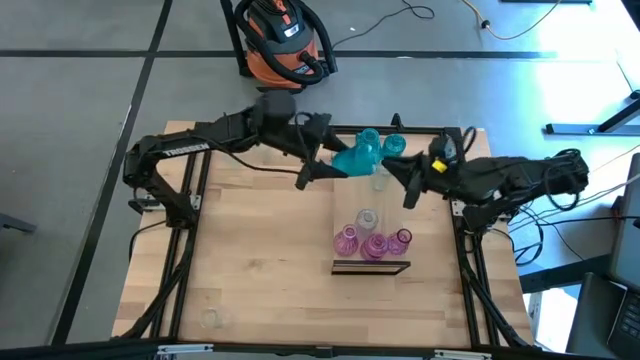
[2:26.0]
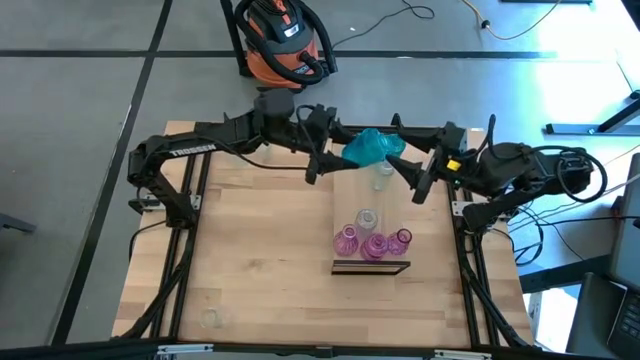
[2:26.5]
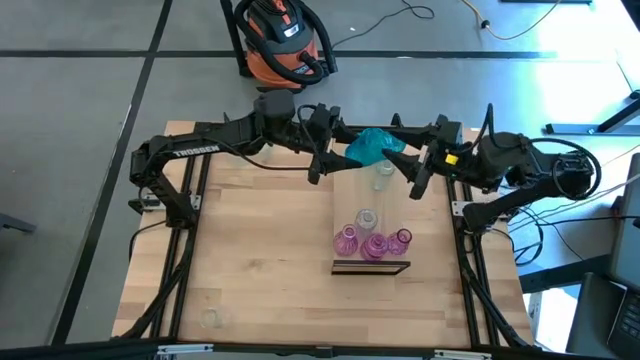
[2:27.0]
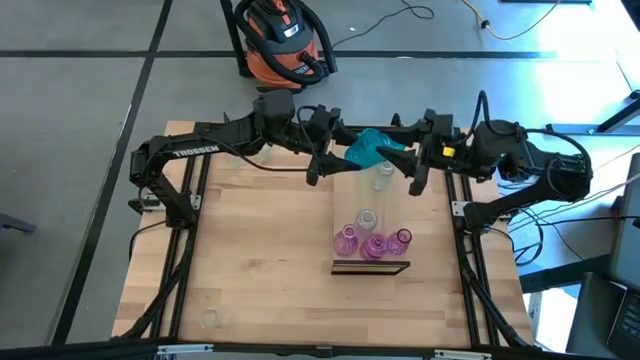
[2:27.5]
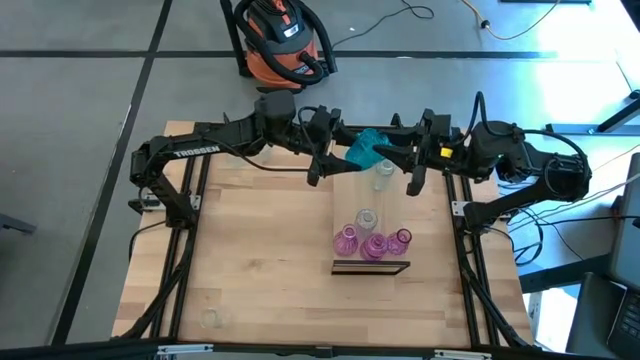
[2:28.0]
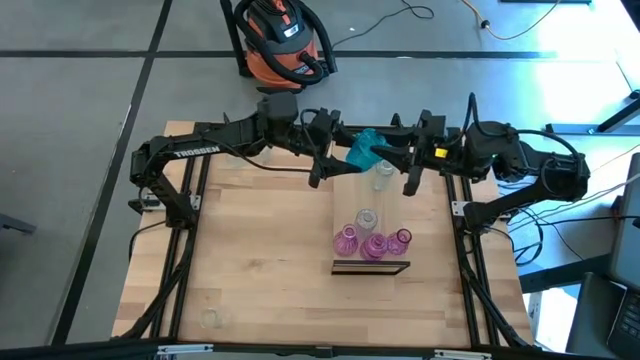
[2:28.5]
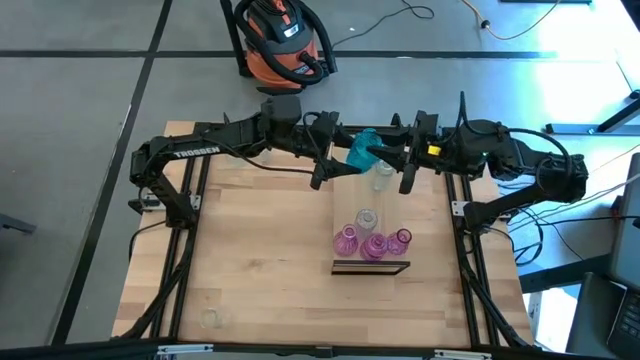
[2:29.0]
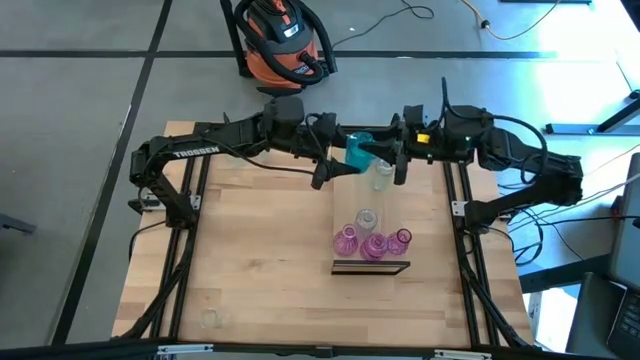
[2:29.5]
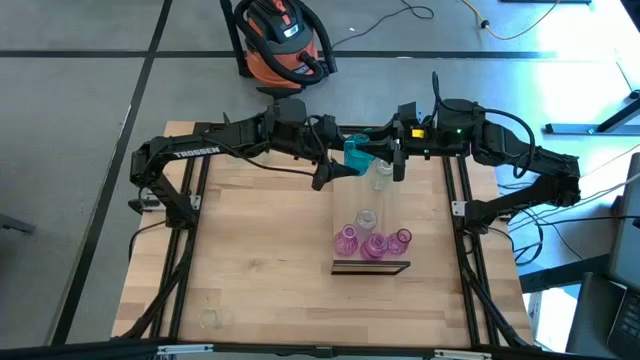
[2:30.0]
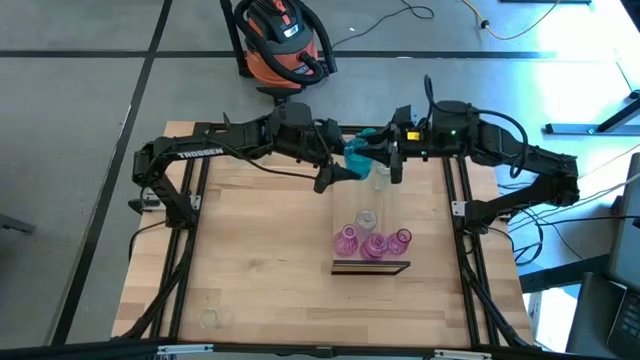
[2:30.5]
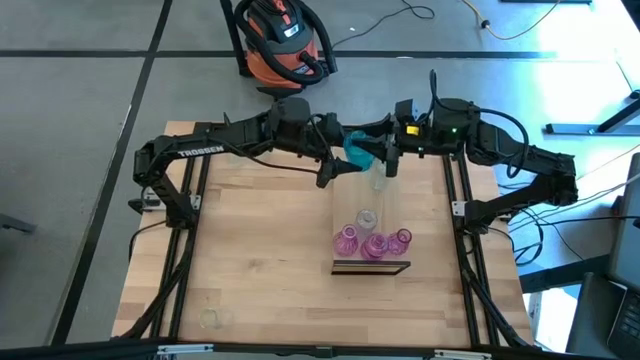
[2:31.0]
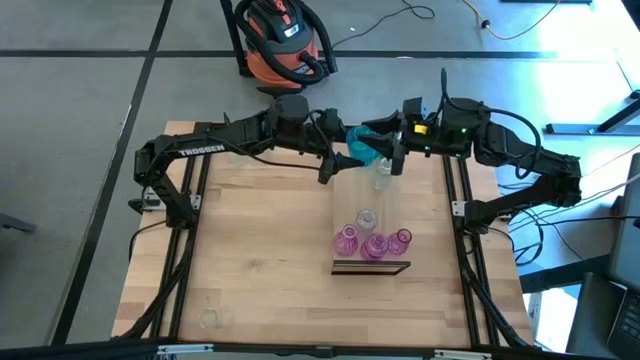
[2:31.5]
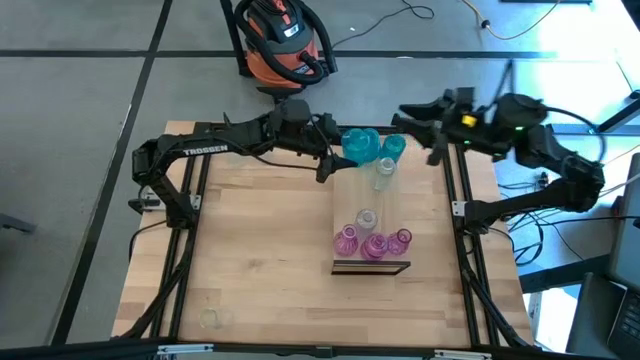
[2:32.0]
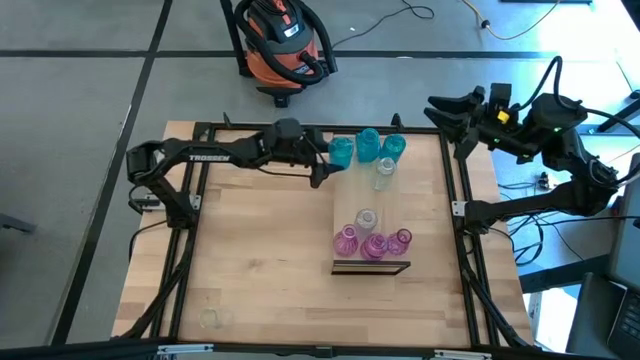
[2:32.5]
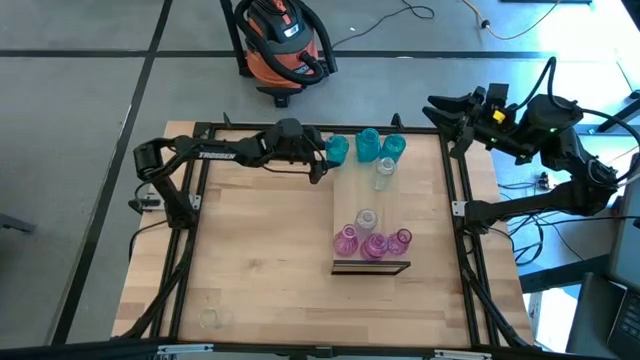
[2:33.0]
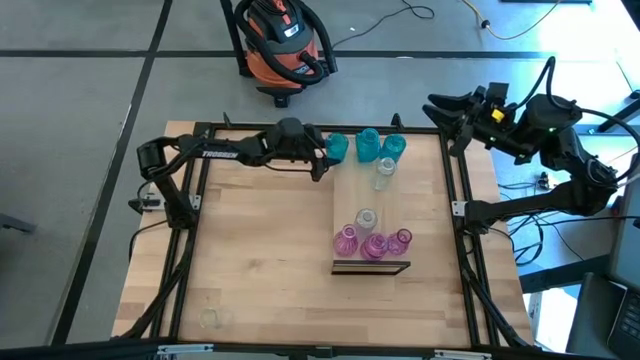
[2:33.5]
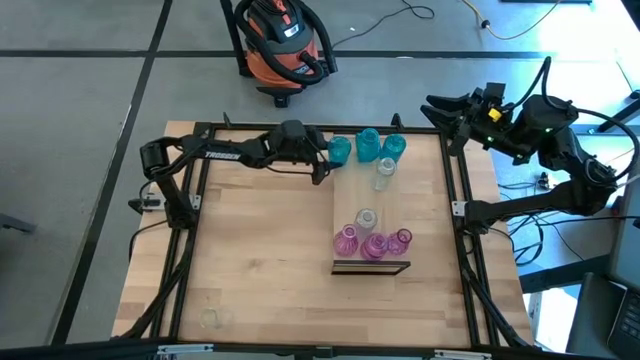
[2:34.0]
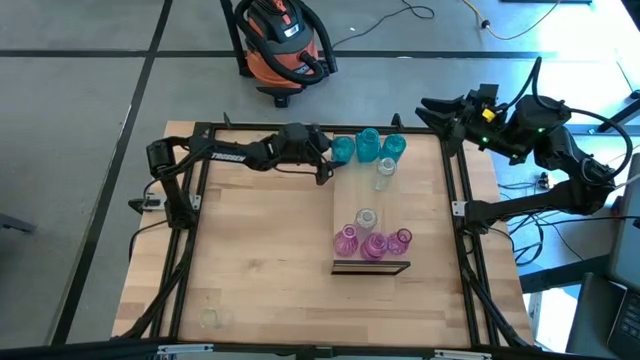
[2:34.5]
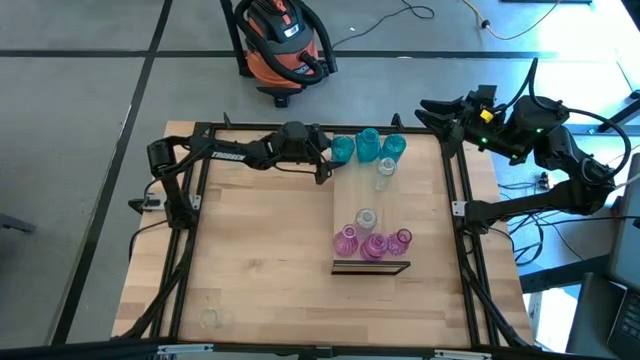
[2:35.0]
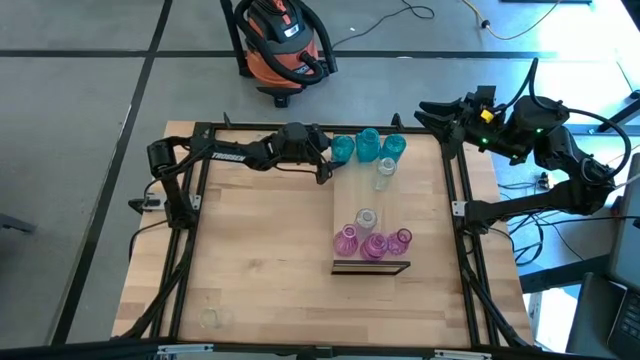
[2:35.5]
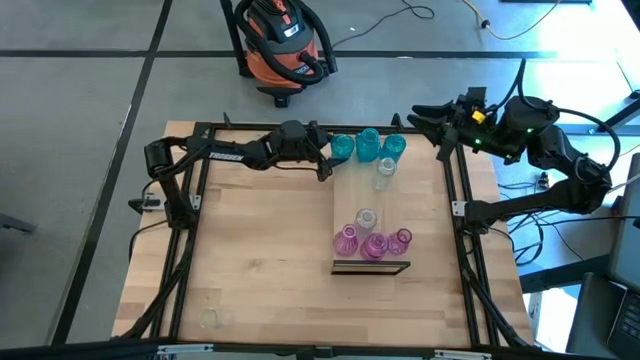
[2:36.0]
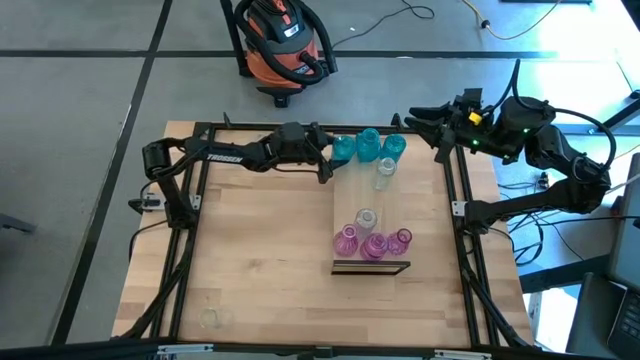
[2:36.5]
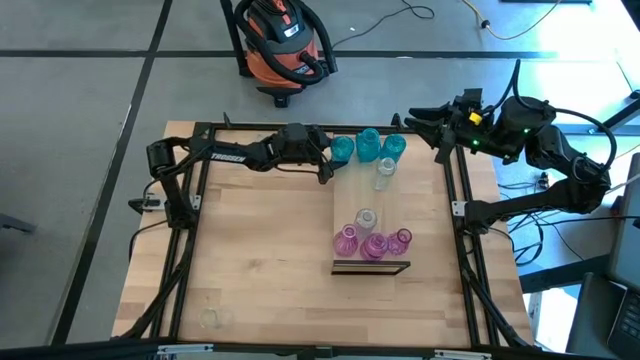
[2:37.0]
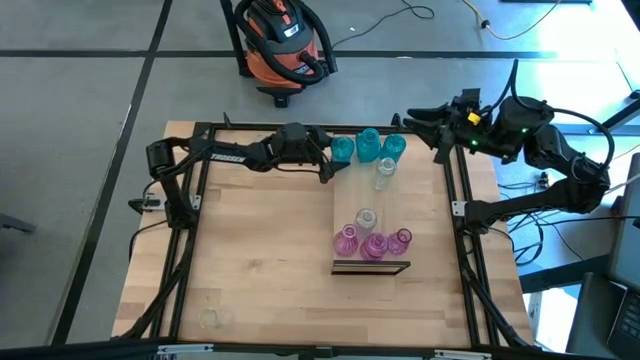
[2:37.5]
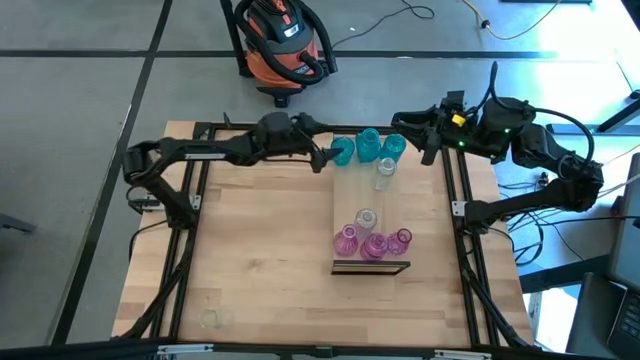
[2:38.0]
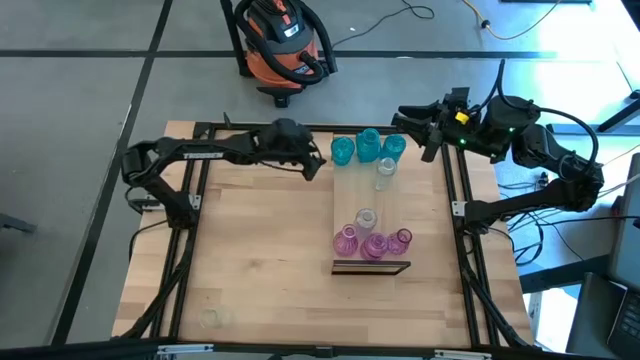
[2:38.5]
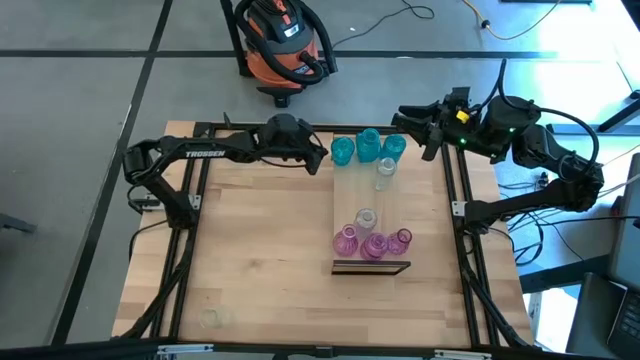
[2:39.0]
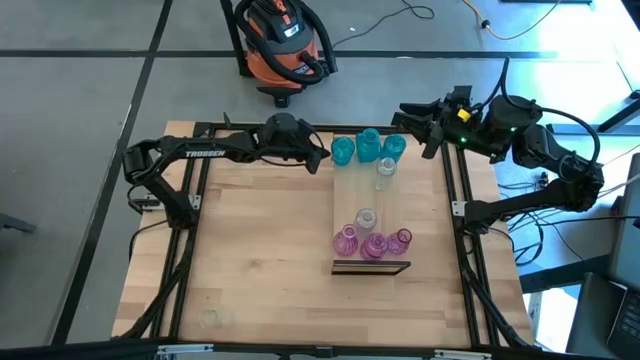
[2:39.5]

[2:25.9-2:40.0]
Task: sort vases onto shelf
Adjust the blue vase on the shelf

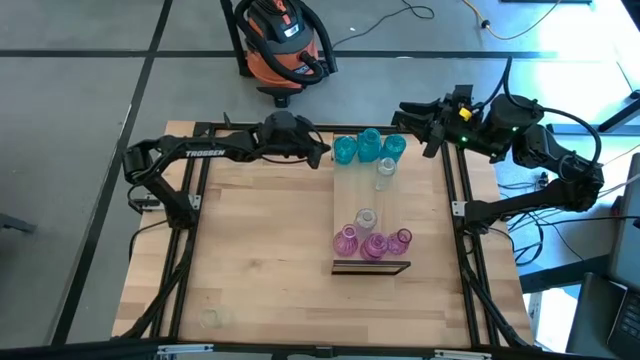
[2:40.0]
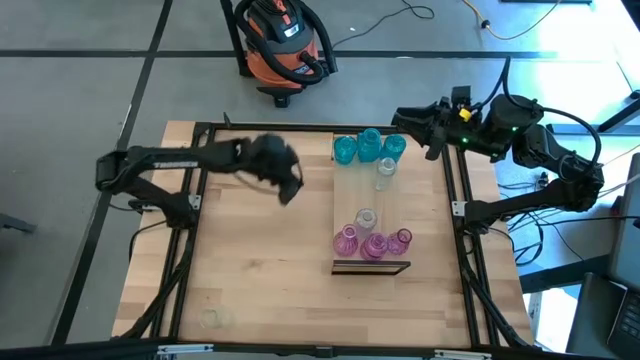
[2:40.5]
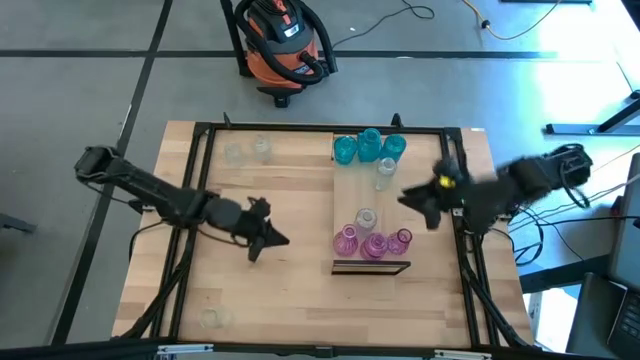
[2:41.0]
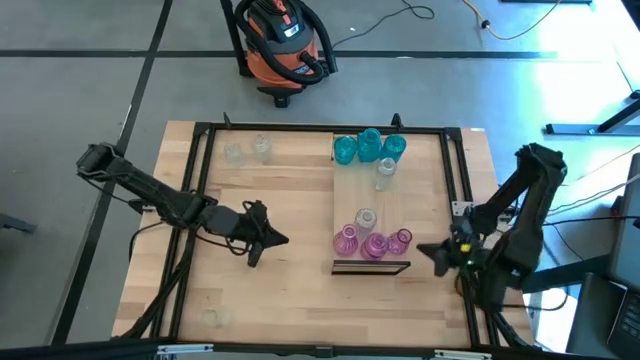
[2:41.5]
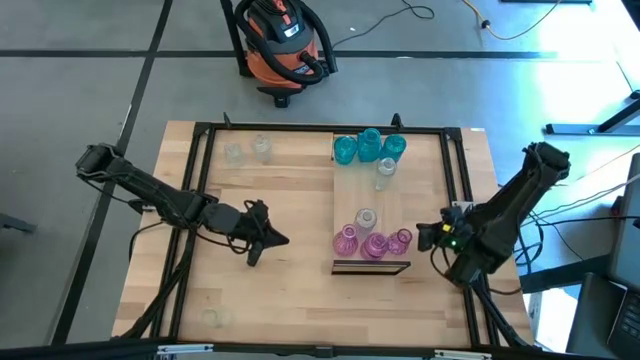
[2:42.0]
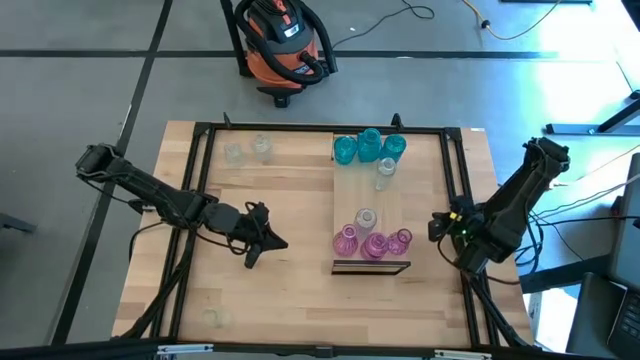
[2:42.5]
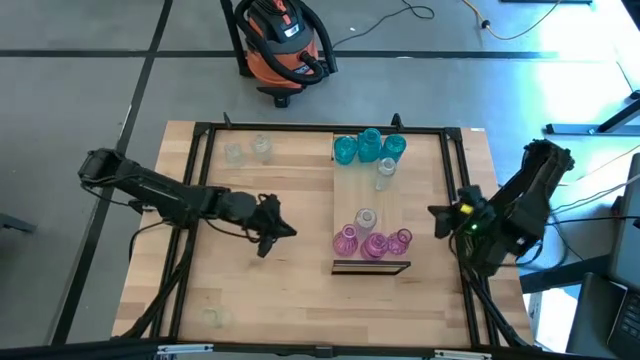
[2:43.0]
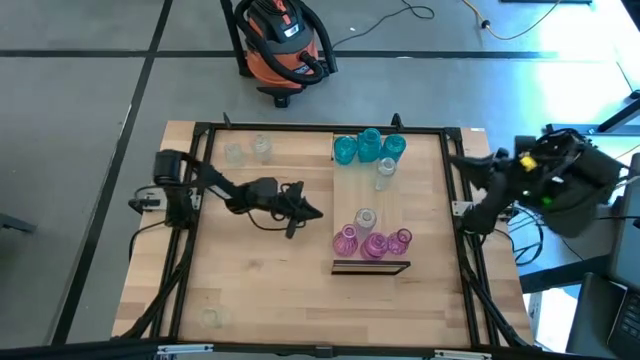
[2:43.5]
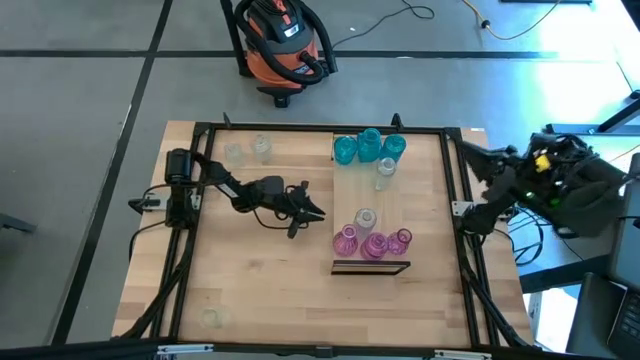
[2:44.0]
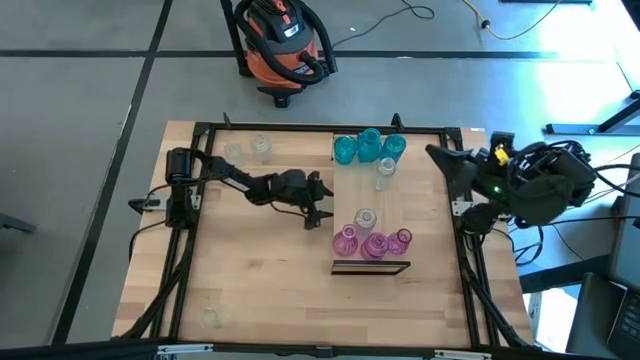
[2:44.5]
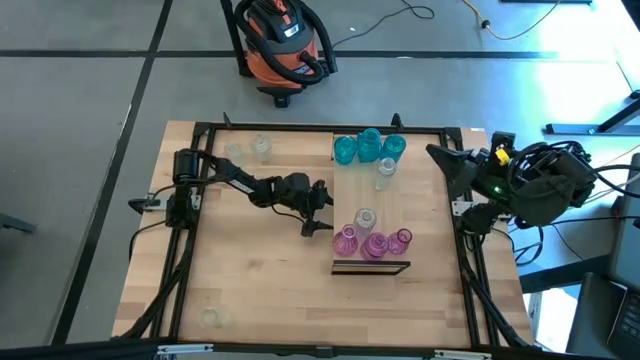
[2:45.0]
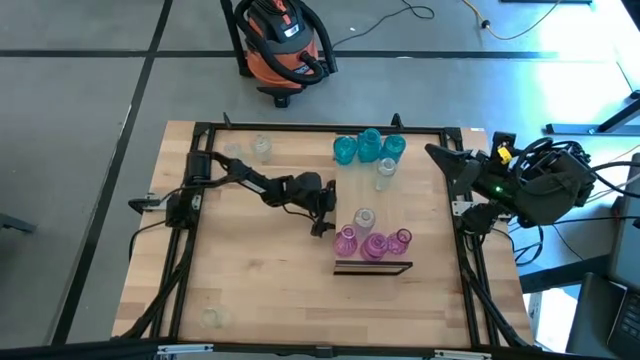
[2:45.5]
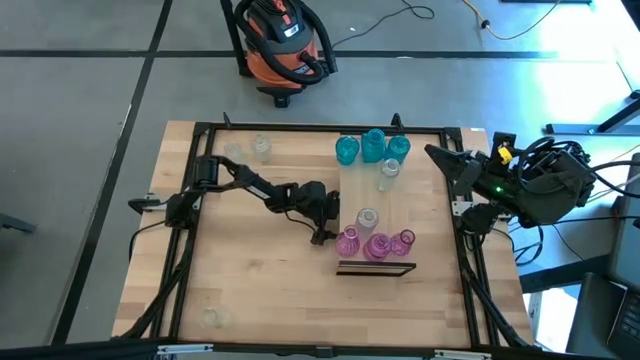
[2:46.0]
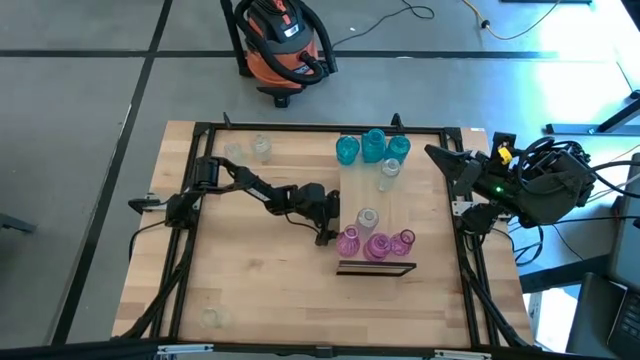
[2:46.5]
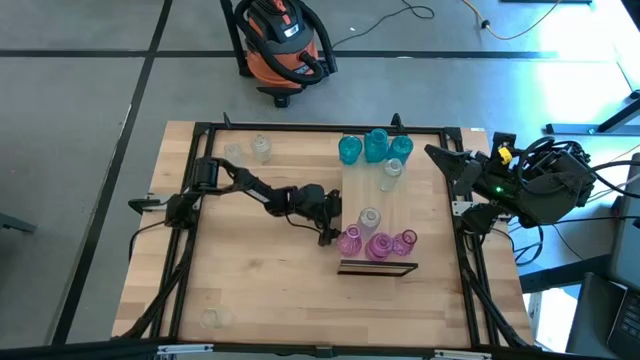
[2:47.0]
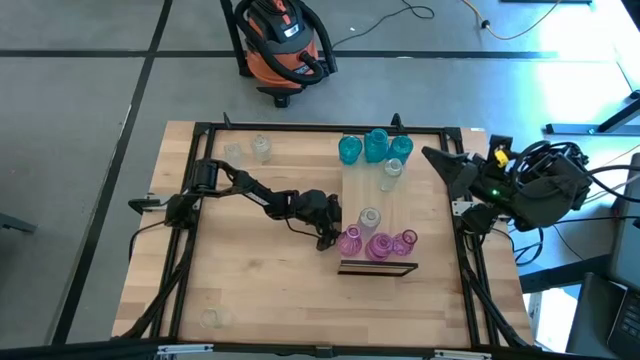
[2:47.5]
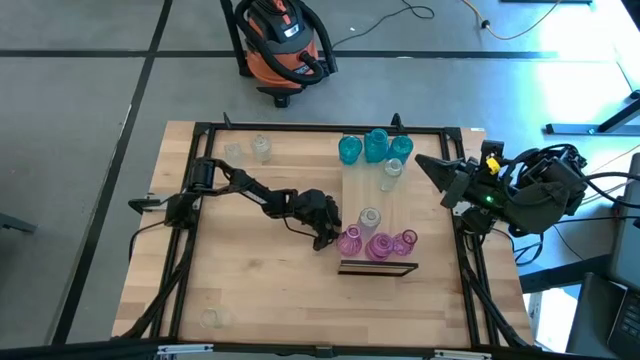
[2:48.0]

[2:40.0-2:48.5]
Put the transparent vase on the table
